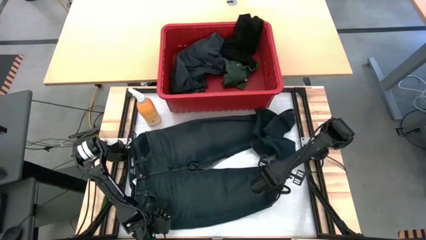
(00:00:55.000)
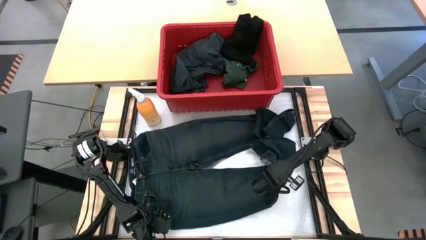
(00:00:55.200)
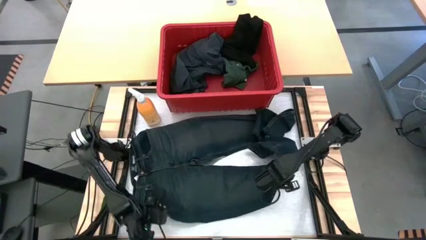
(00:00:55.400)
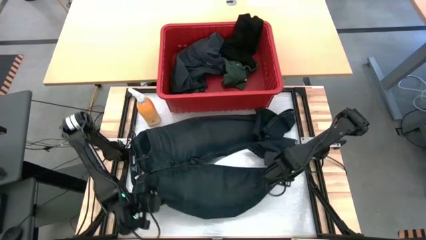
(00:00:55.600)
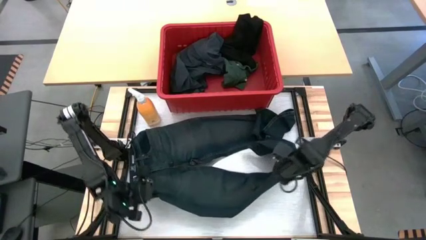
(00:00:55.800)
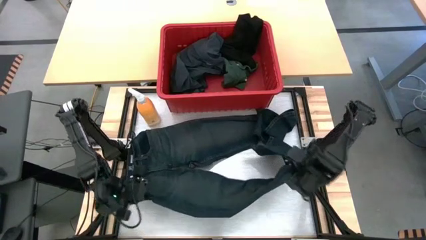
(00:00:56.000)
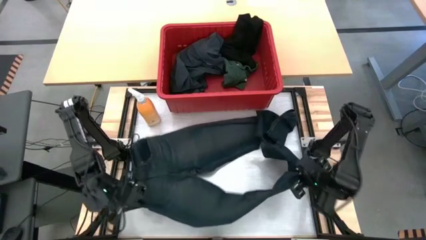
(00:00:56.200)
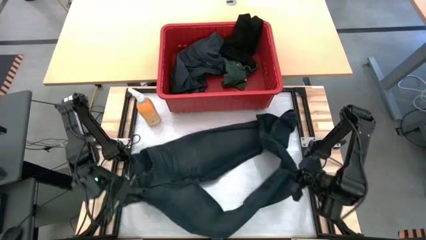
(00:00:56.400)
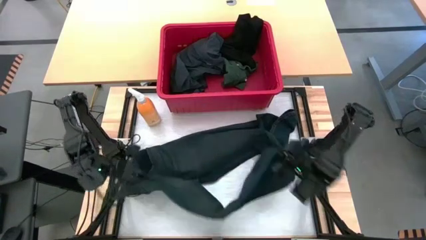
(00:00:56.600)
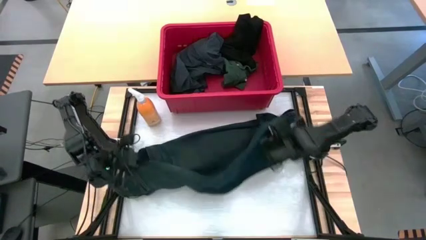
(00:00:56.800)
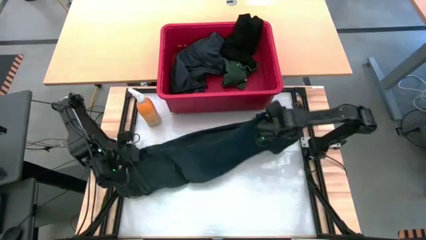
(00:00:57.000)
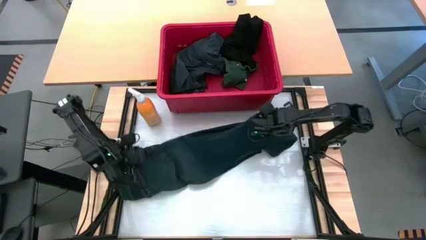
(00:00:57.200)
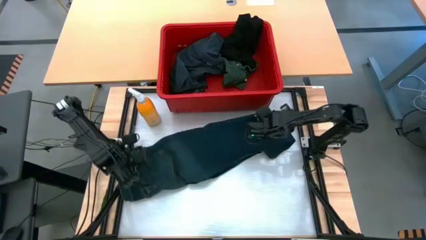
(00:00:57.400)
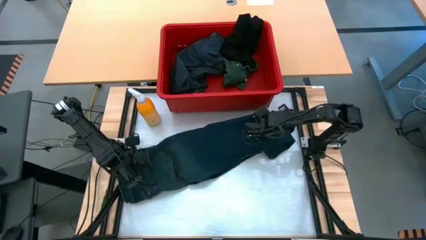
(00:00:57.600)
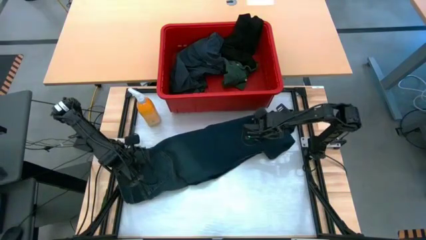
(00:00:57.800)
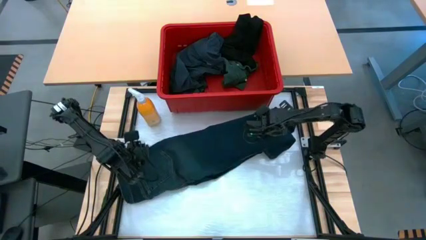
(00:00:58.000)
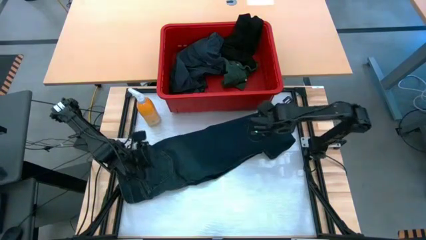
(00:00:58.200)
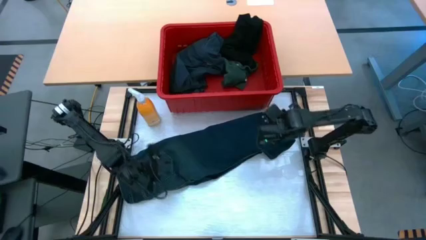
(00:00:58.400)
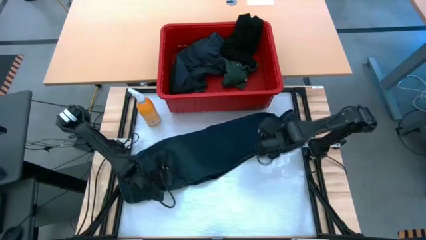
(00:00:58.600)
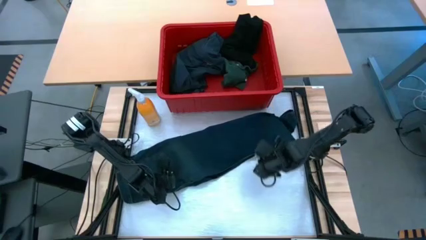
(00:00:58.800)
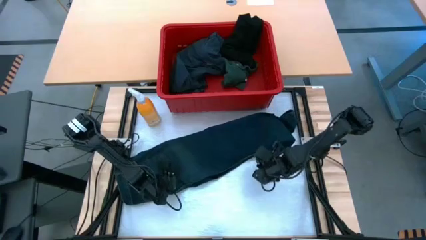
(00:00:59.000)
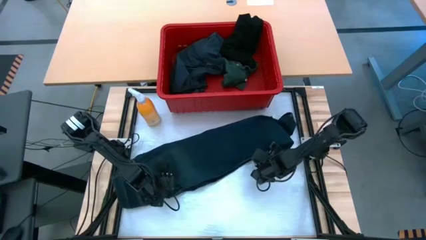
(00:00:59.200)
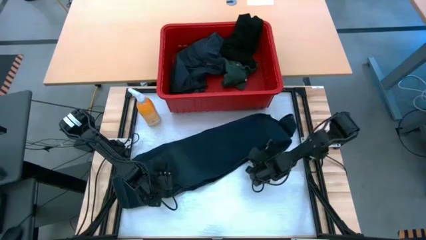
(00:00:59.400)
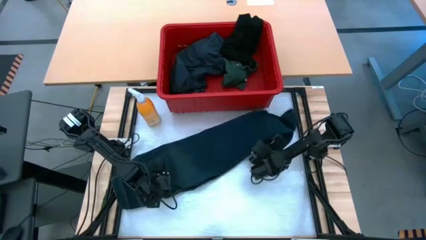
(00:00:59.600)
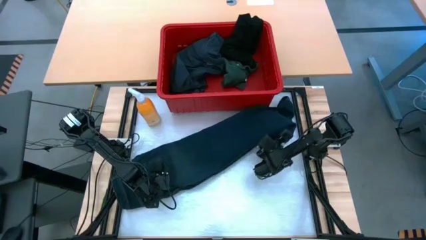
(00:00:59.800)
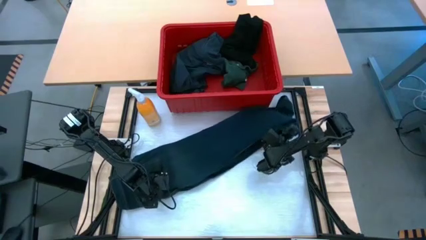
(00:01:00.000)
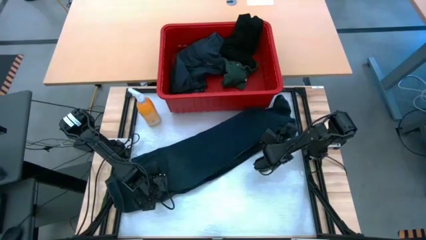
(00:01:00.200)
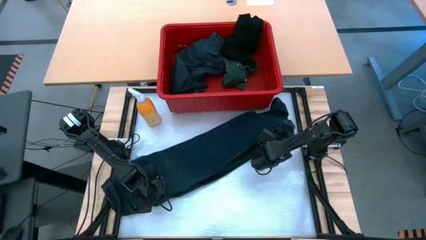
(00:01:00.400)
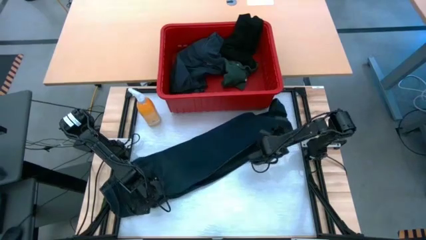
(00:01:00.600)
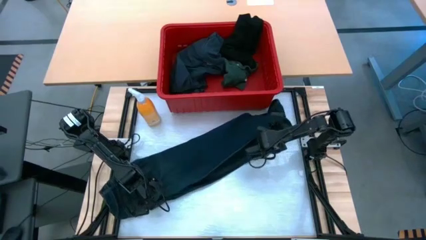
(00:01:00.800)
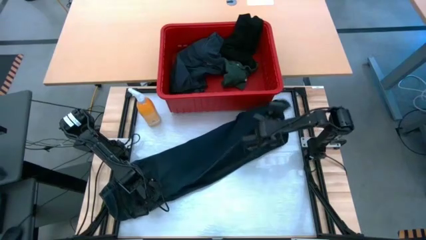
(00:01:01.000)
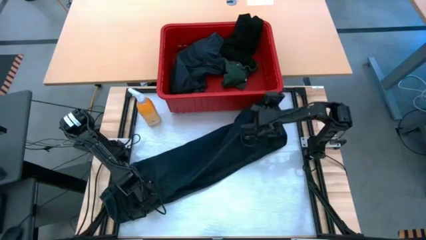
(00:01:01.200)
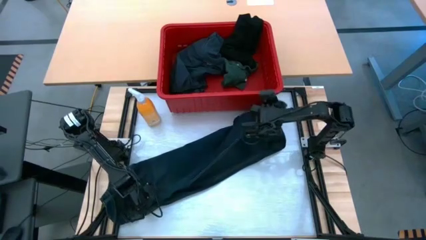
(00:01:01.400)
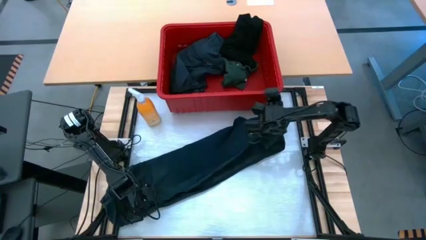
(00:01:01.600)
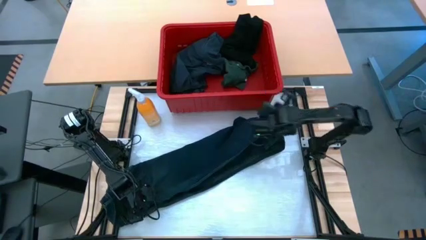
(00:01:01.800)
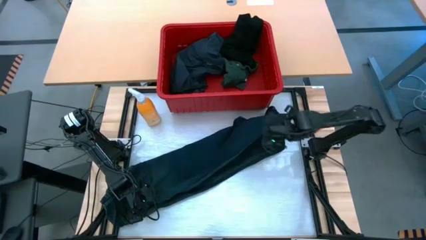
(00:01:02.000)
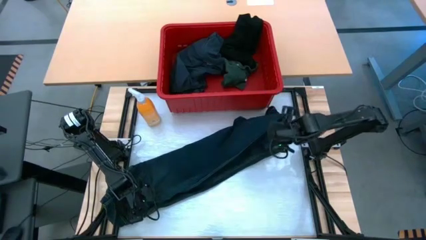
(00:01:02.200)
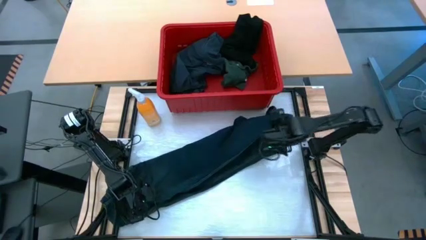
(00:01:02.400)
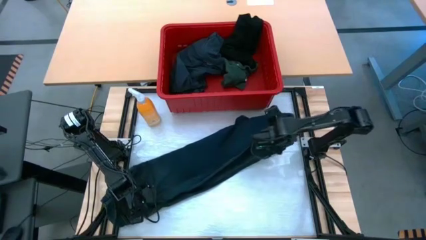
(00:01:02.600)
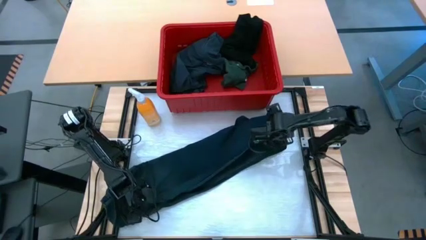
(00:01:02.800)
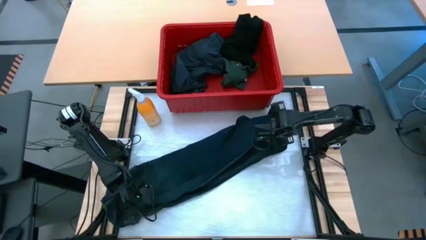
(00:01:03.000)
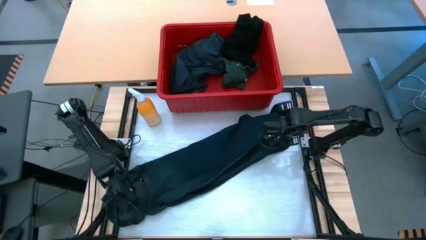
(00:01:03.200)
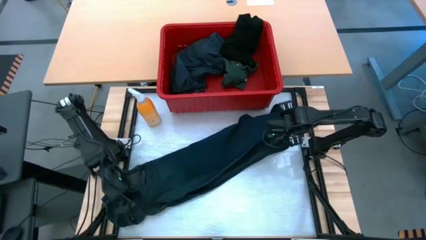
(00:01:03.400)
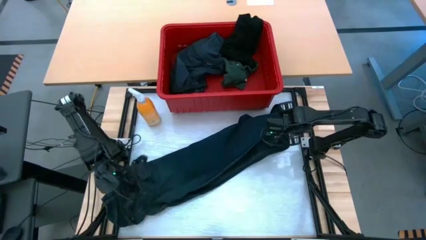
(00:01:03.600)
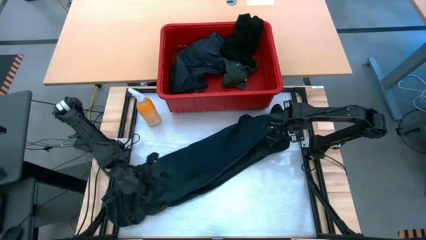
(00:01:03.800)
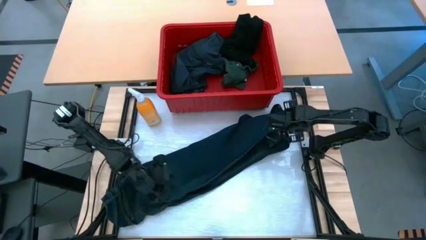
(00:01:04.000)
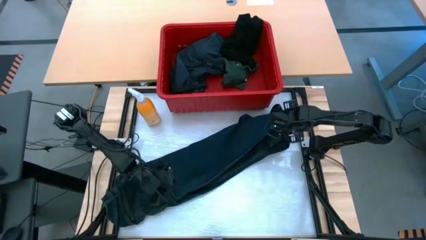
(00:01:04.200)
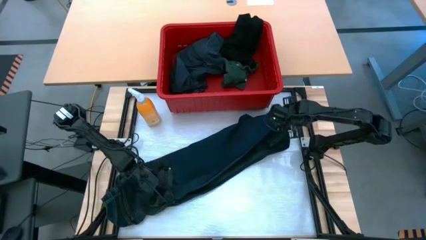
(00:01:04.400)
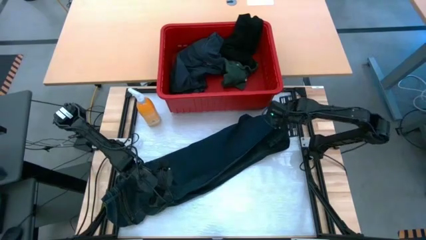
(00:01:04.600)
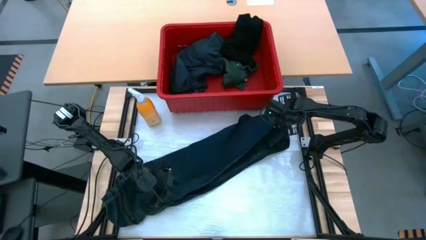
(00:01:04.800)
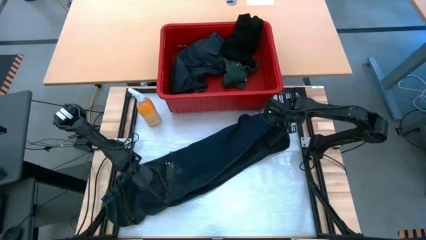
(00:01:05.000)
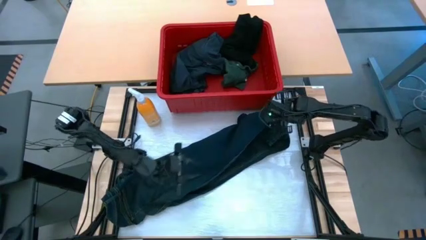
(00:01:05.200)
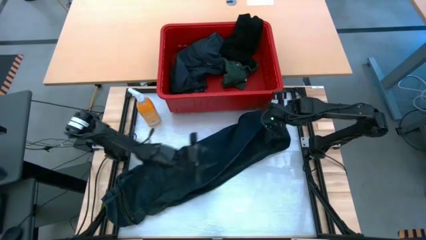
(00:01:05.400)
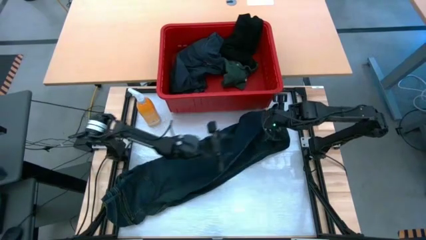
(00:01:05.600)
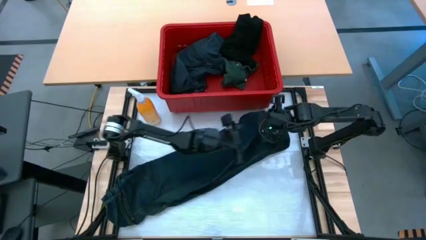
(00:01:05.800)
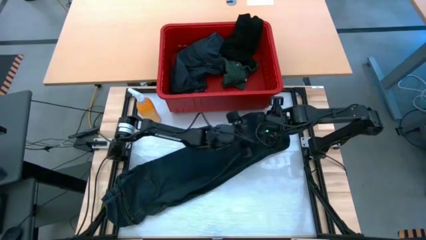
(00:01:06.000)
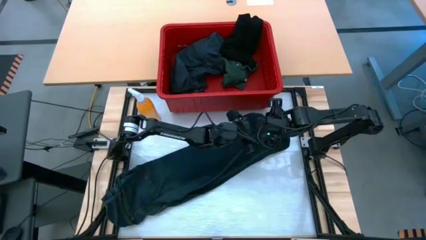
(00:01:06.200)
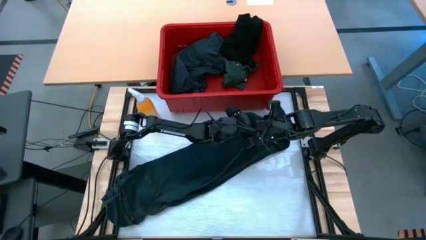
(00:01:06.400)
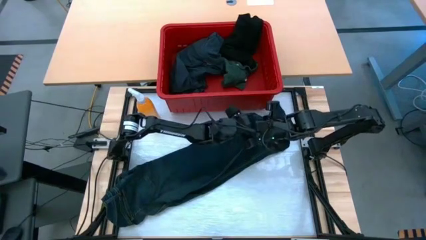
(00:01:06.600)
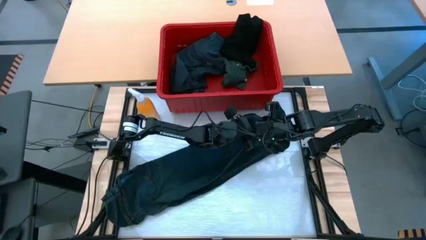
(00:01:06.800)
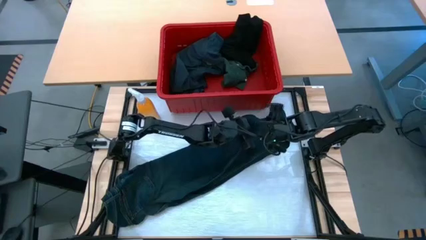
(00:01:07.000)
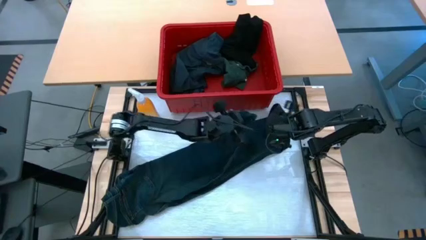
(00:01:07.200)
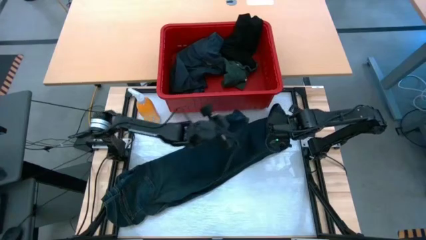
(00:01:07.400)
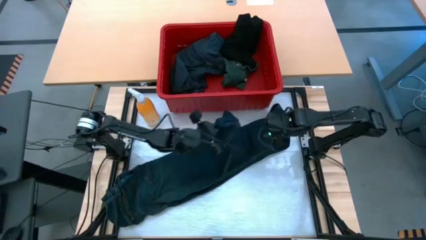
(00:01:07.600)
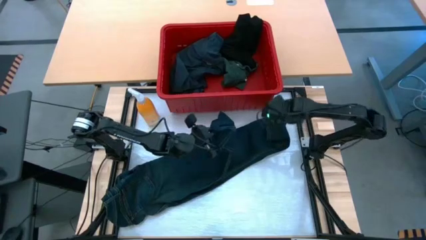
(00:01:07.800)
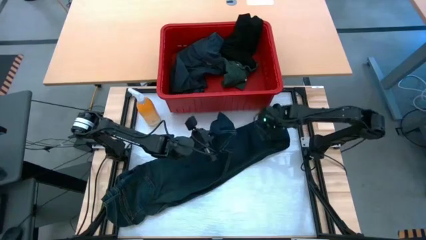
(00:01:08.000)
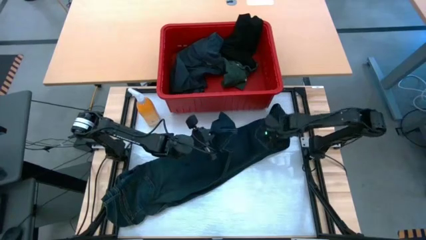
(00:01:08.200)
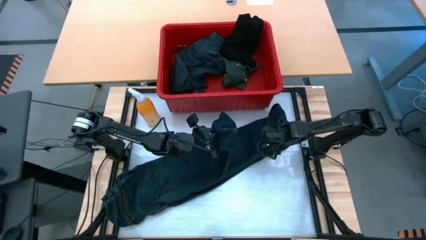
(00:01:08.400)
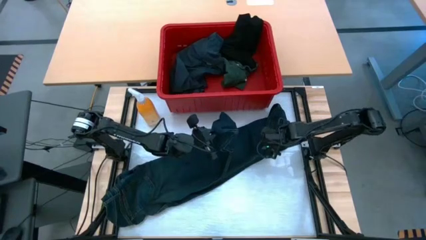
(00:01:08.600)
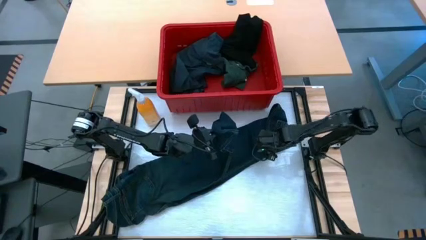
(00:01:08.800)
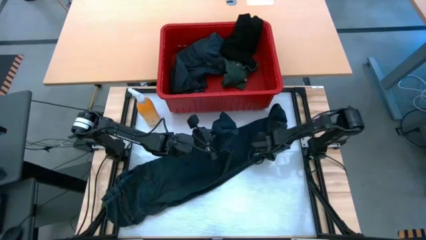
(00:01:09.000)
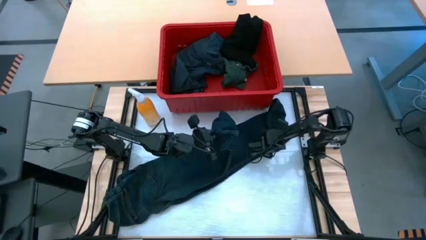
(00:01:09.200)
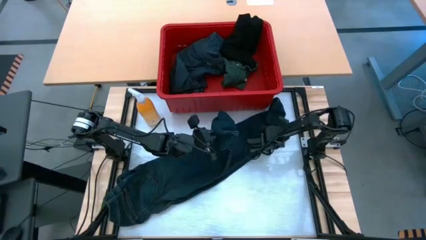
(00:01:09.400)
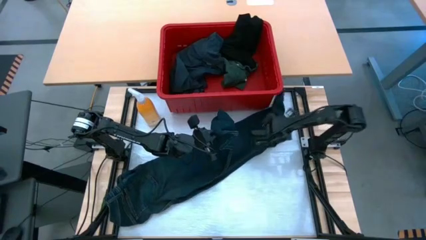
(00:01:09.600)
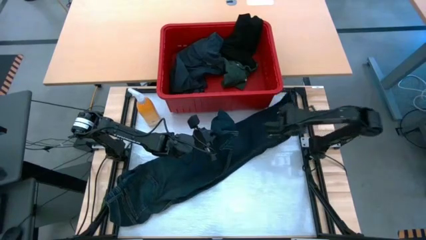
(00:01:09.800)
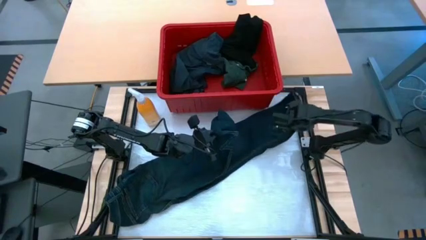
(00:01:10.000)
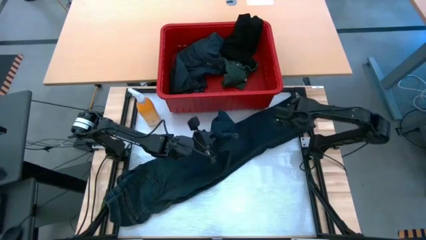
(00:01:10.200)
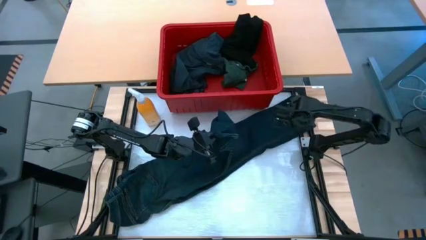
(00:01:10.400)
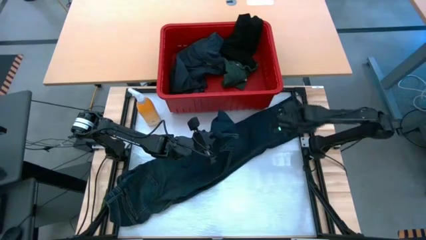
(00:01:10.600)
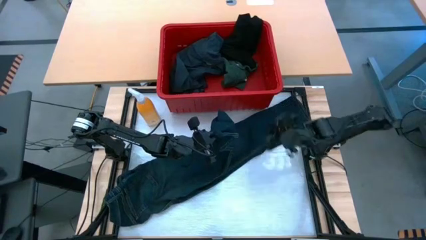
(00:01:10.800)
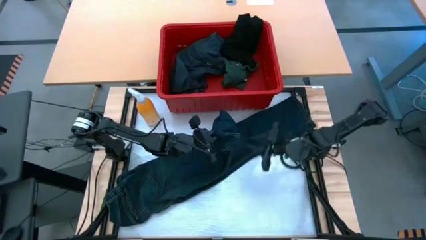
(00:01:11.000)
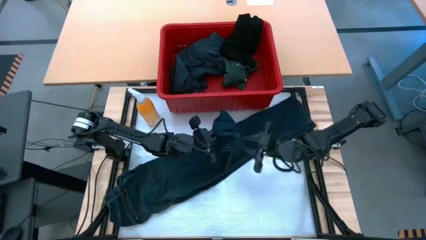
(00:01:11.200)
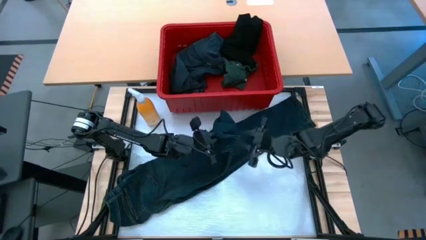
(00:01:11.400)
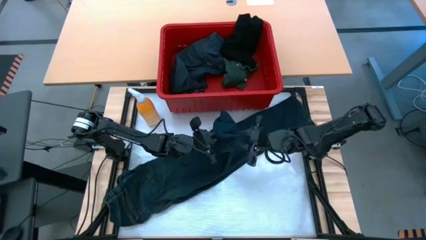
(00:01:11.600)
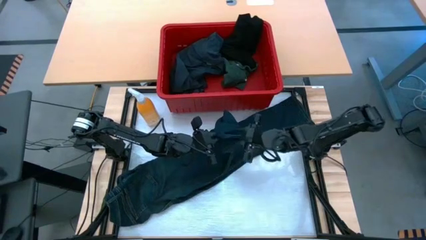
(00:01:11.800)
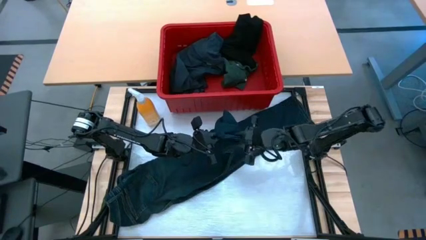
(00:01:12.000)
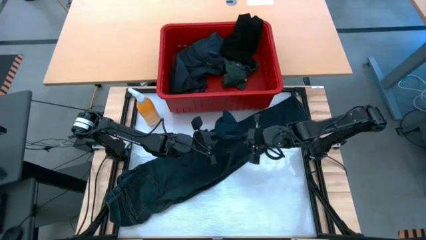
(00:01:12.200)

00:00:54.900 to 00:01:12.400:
Task: Fold Laundry from Bin
Fold the dark blue jeans
